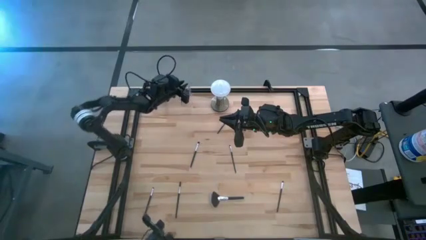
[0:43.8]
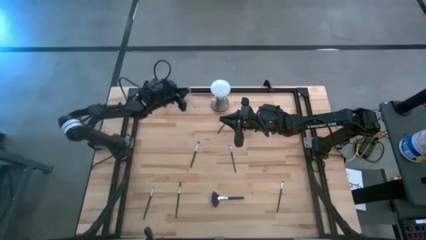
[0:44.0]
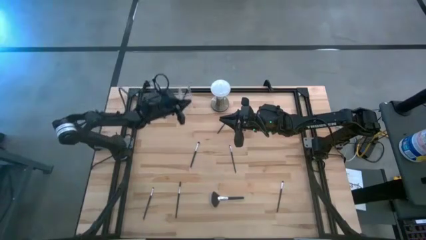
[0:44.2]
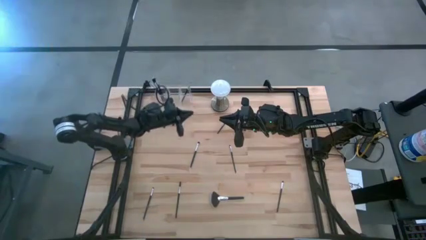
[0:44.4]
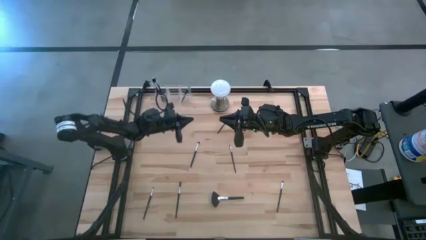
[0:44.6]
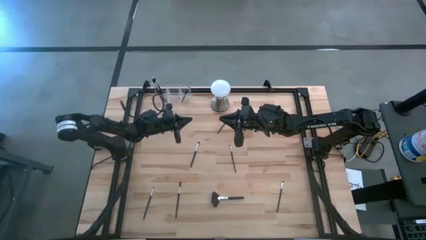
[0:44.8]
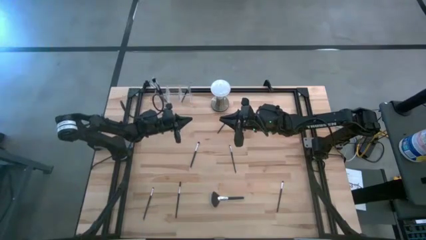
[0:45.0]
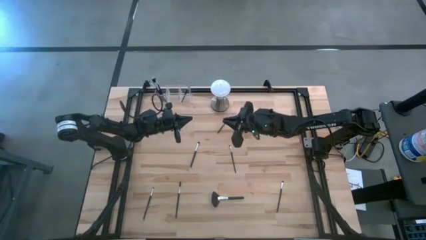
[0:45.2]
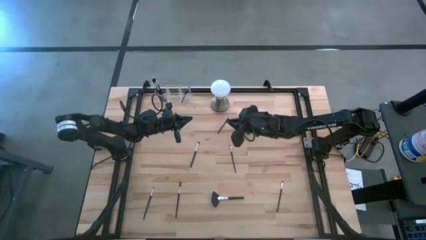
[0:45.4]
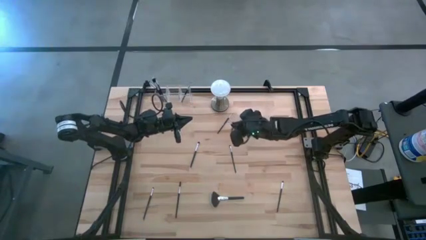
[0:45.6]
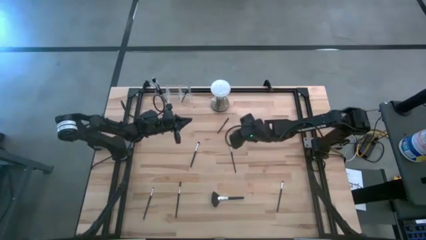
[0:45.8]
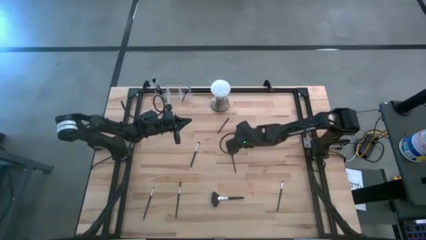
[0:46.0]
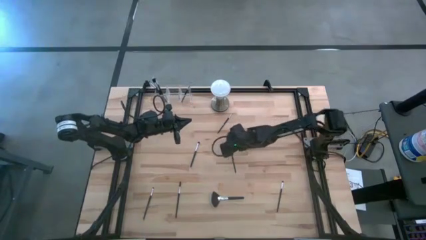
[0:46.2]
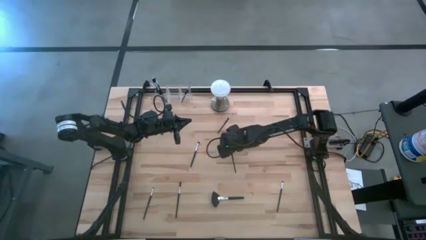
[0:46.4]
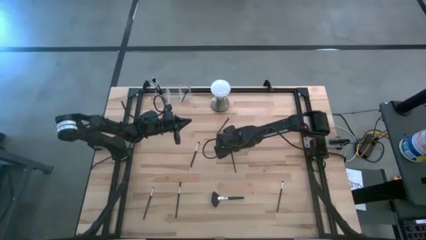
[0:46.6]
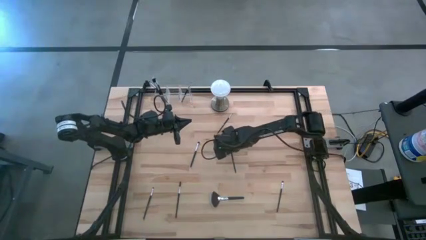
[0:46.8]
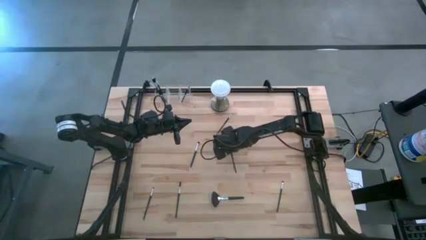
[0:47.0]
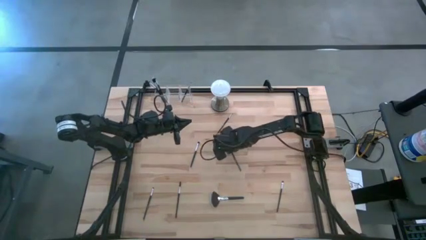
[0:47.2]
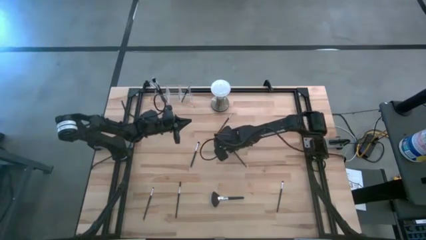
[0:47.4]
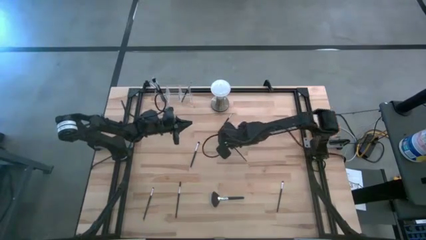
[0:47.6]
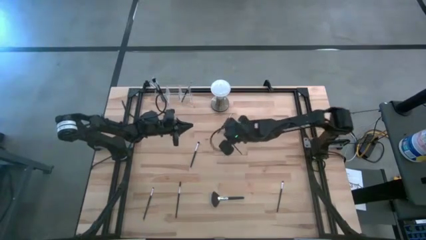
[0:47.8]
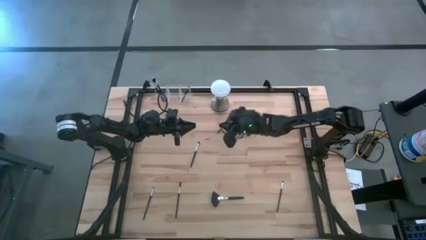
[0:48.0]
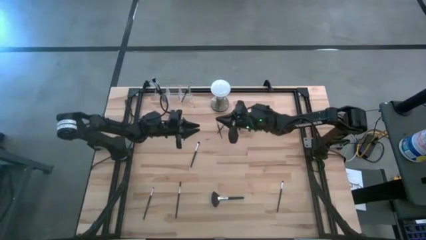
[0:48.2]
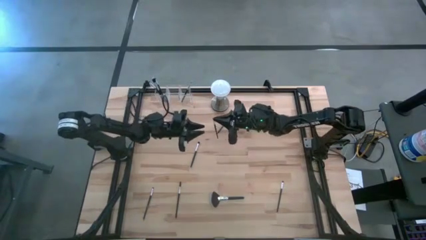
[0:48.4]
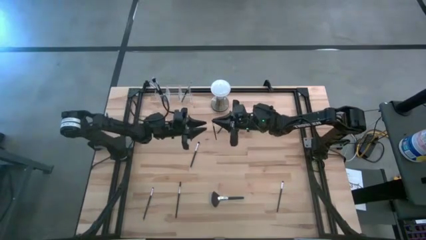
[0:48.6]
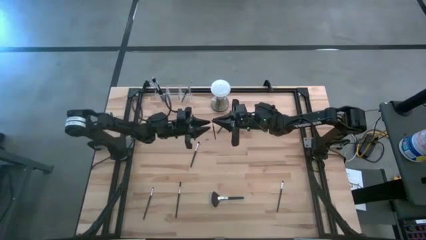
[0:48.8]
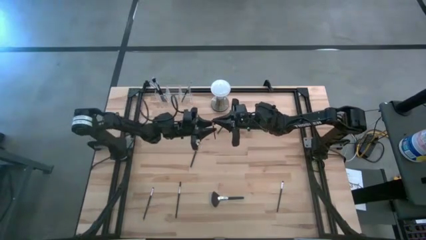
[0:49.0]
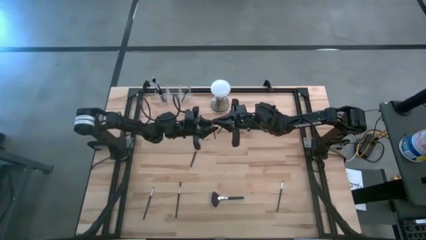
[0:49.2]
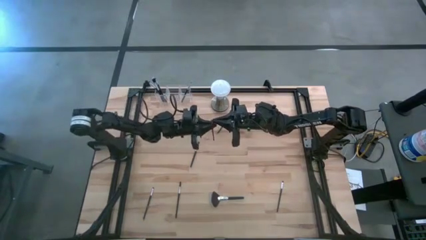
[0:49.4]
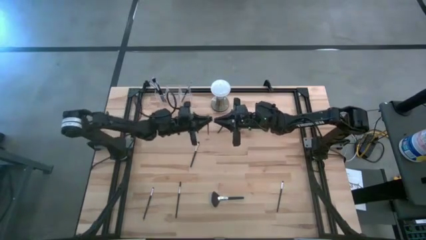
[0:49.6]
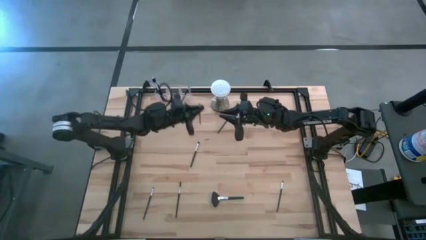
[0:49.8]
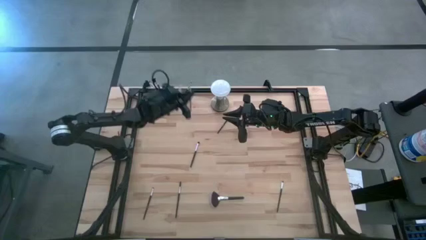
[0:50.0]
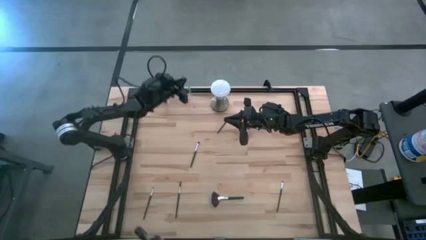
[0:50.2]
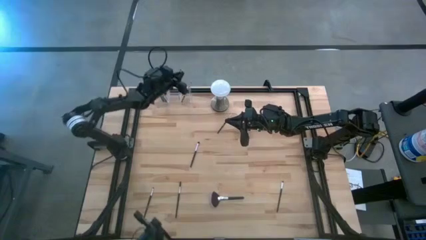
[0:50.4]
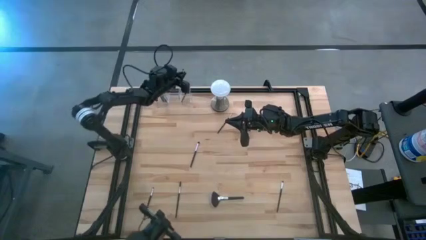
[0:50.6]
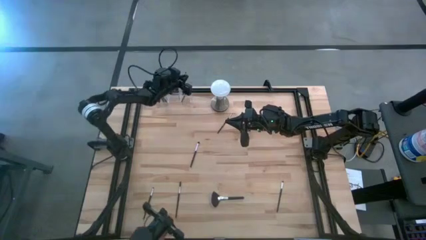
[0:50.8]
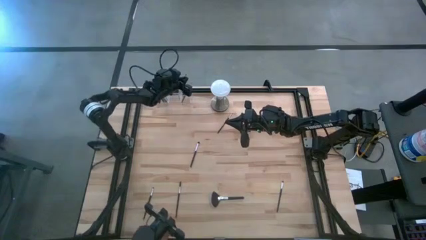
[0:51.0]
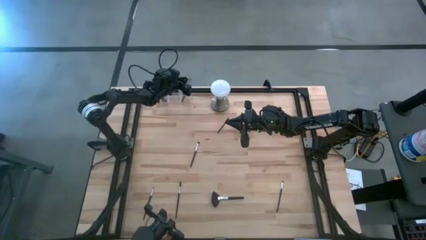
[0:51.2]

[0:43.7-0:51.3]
Task: Put items in baskets/containers
Put the eyeshadow brush into the right section of the transparent organizer

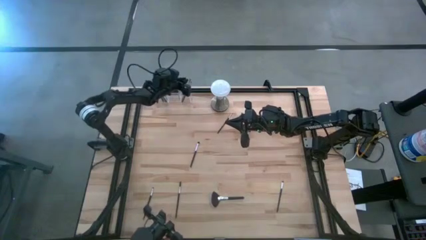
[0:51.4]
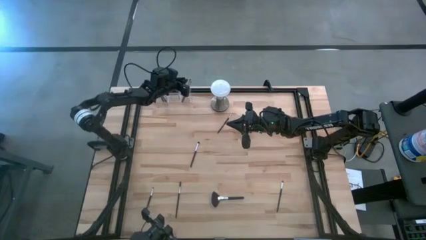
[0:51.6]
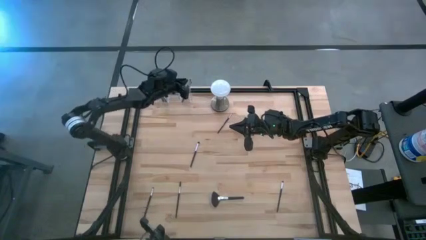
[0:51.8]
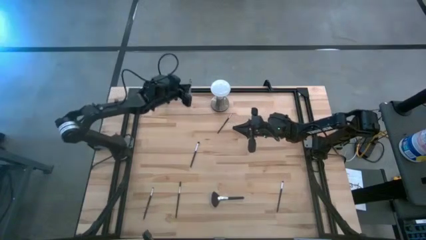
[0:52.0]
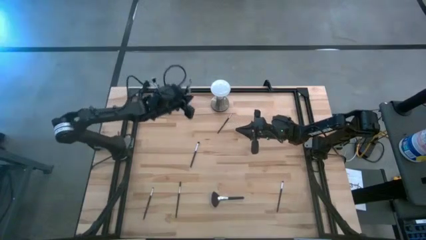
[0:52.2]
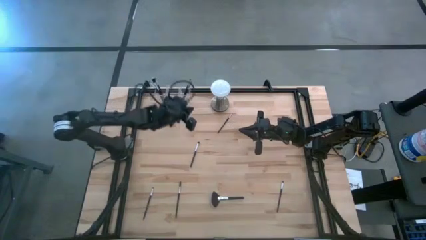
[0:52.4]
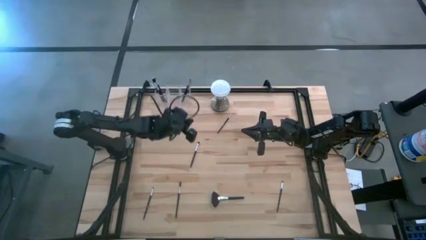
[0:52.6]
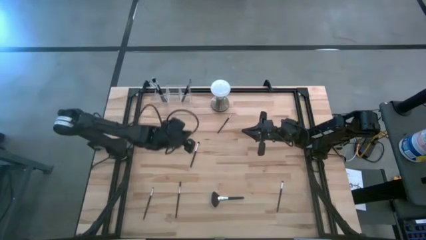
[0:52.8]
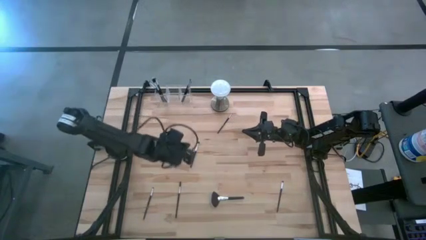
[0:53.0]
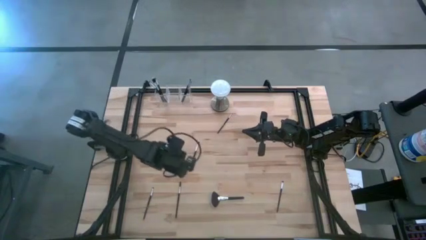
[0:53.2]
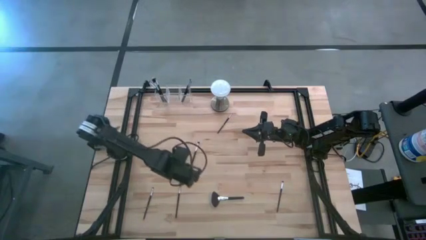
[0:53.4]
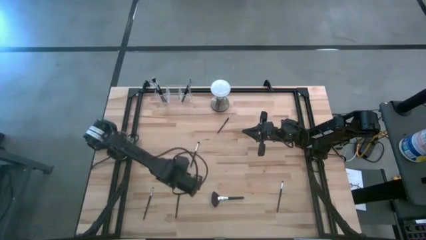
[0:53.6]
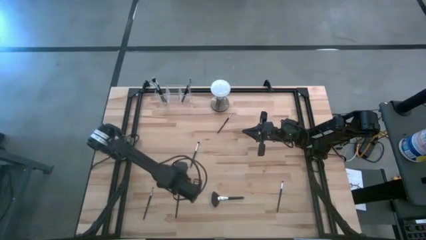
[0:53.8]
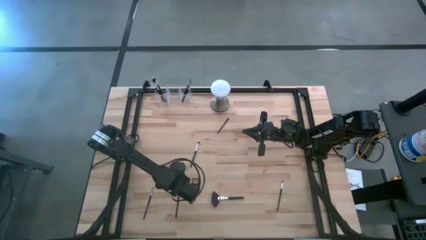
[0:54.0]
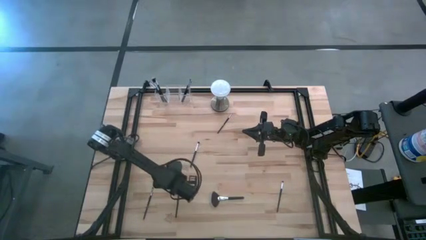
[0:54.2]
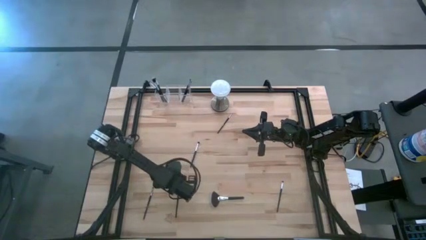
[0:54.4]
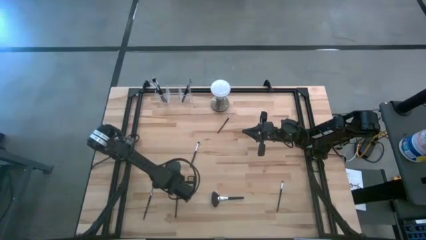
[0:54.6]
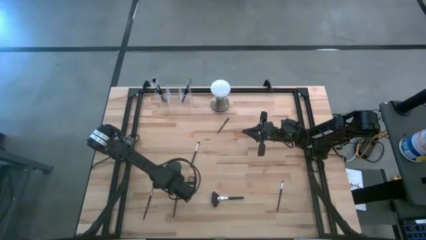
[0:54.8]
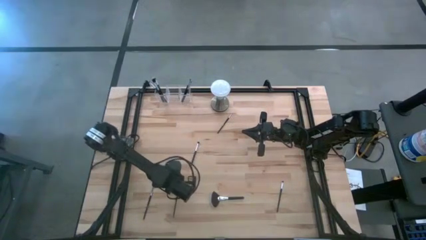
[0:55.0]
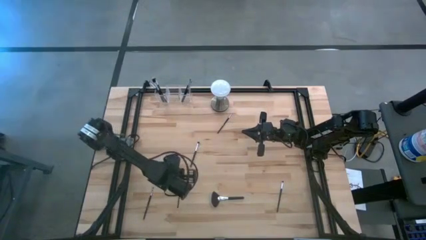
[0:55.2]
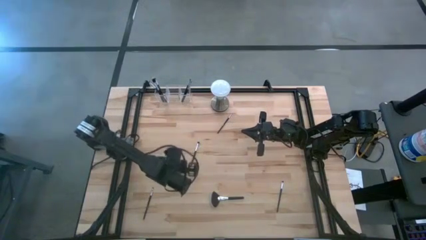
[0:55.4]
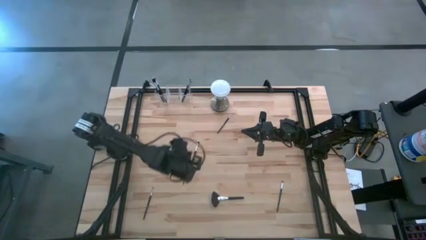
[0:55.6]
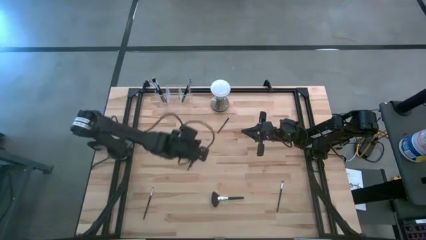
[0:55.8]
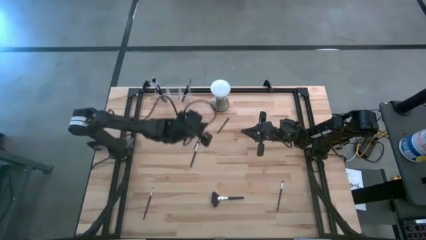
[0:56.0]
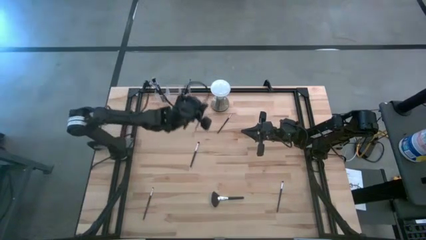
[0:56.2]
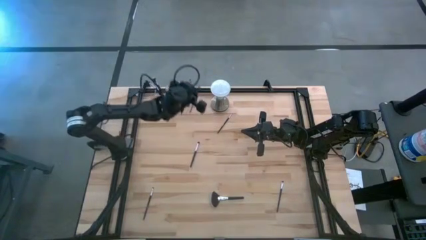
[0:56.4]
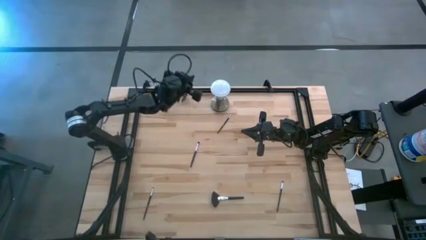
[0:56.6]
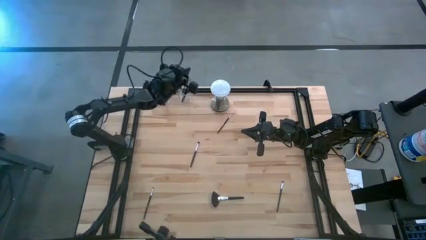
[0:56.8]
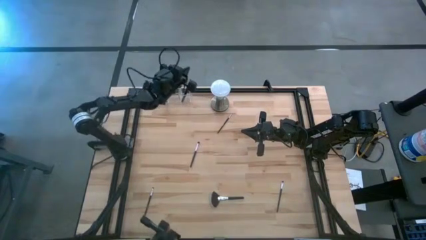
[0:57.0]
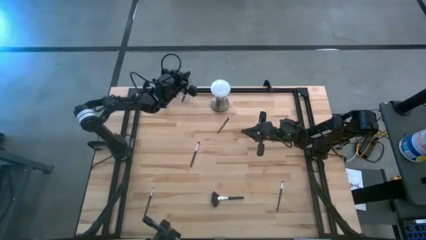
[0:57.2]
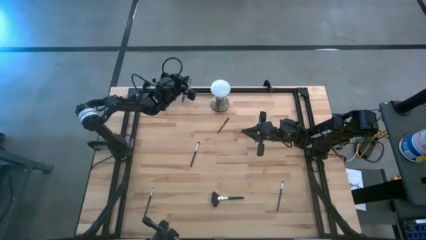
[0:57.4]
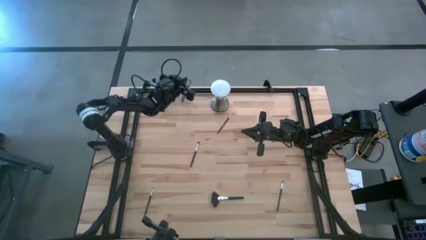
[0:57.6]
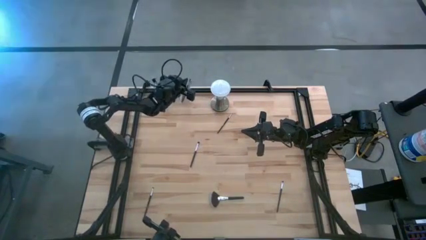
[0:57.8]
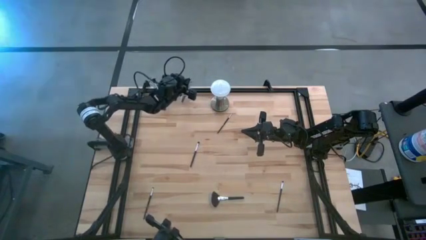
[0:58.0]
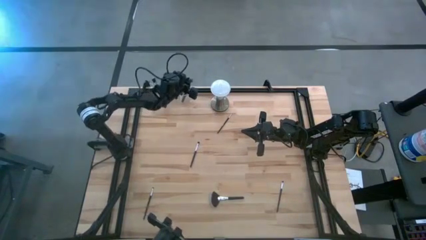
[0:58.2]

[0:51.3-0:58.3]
Put the lash brush into the right section of the transparent organizer

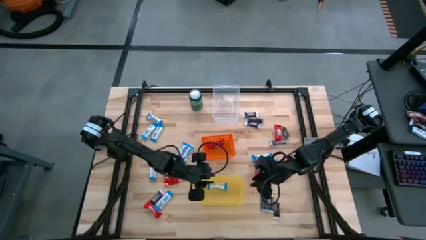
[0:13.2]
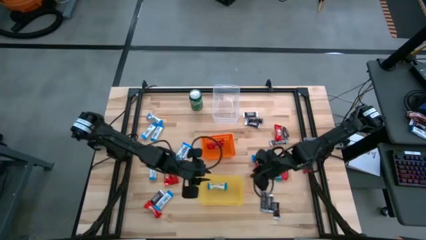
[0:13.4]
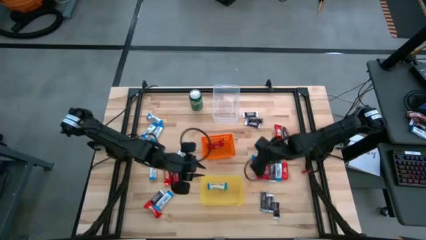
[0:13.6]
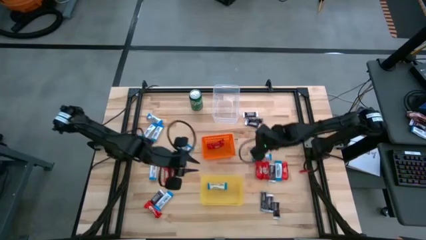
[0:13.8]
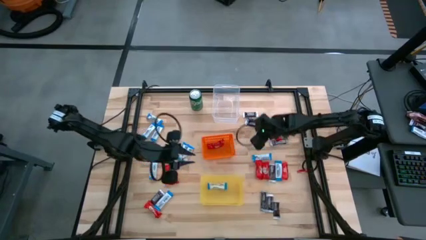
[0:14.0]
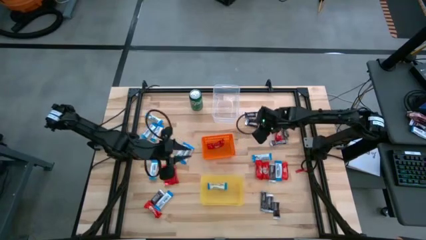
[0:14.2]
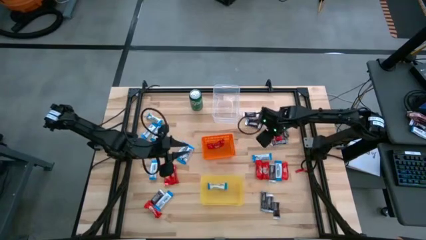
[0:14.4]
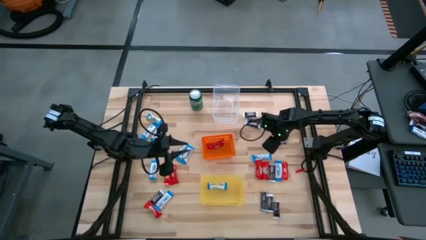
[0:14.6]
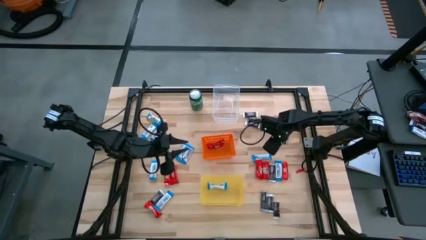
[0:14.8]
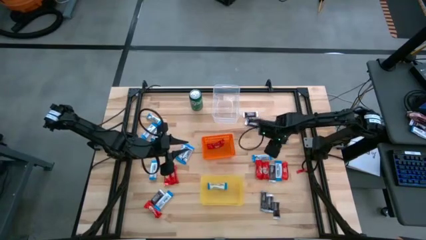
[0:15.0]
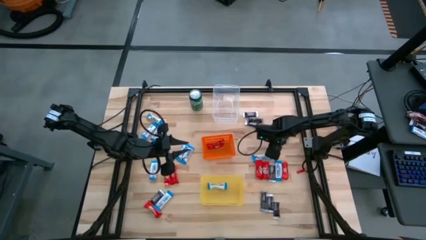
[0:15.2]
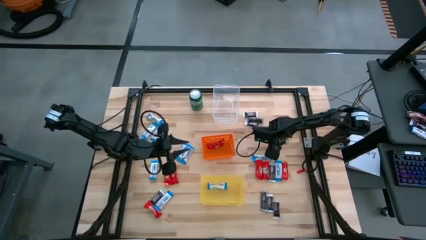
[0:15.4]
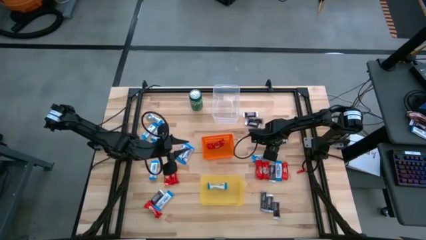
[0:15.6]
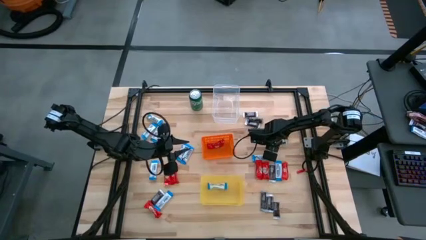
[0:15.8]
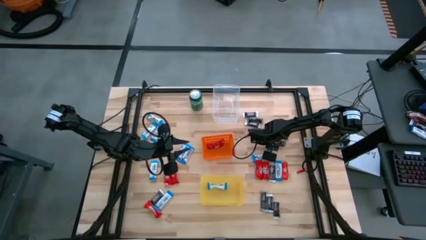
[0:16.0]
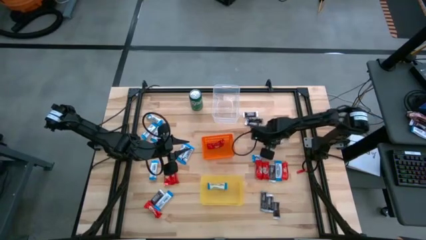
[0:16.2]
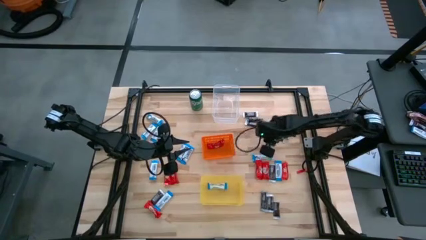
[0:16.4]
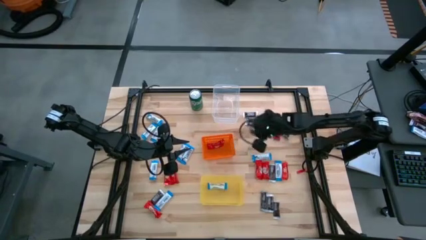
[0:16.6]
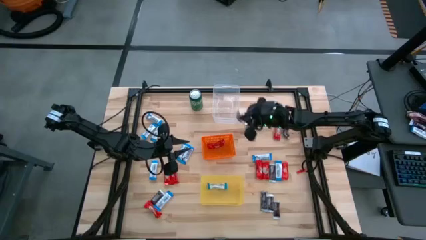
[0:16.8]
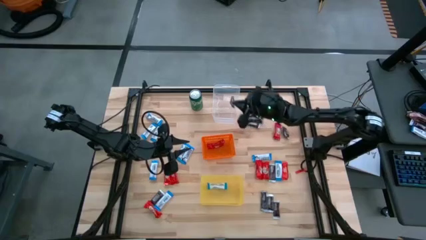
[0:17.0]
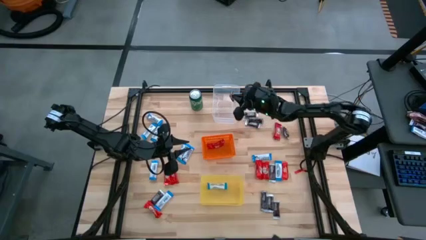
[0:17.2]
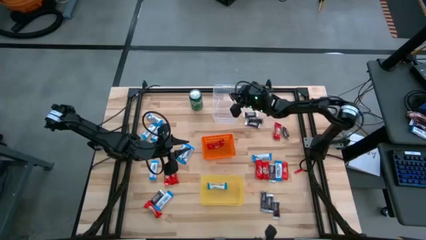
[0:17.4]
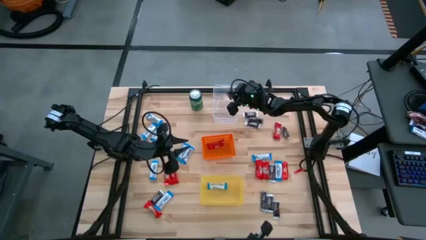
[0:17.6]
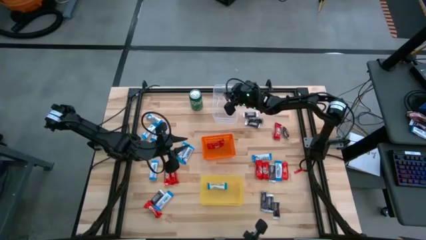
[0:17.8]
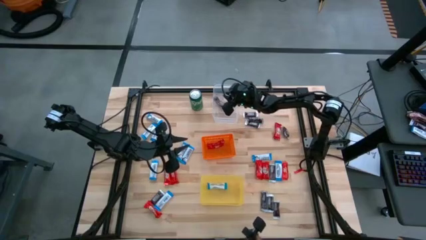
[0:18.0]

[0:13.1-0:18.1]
Task: Sort candy
Put the black candy into the transparent bin
